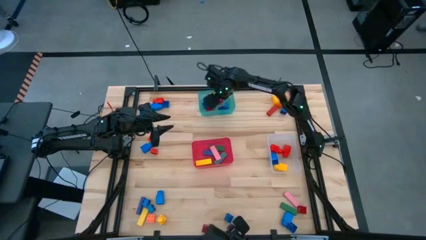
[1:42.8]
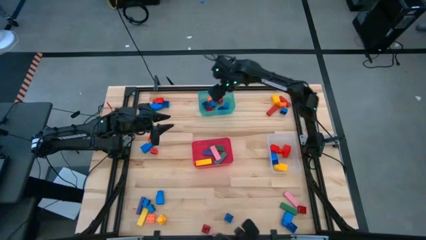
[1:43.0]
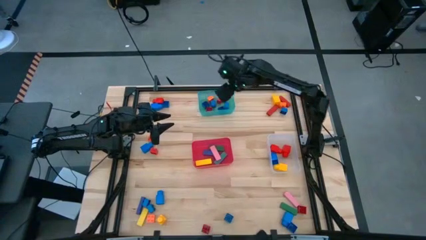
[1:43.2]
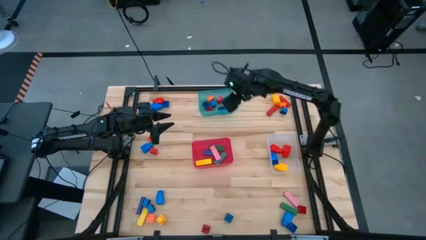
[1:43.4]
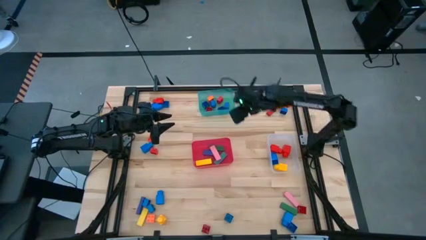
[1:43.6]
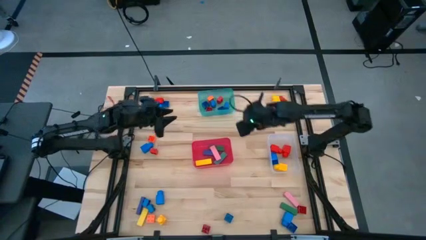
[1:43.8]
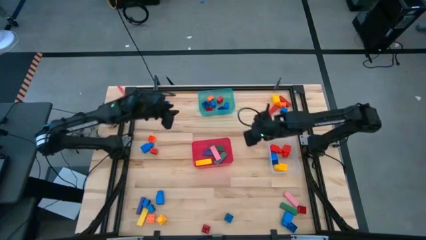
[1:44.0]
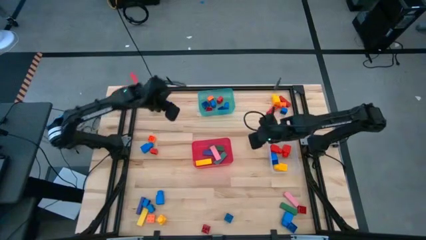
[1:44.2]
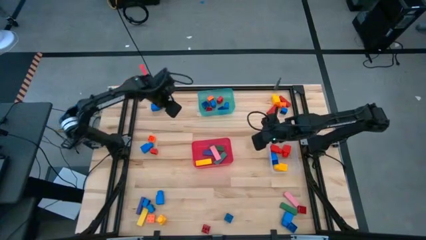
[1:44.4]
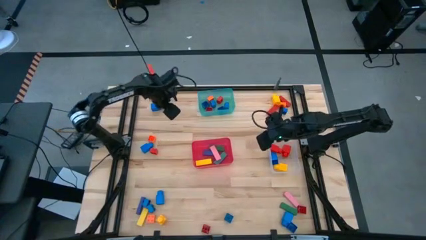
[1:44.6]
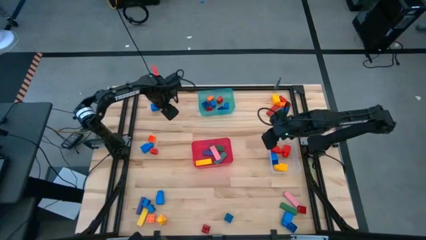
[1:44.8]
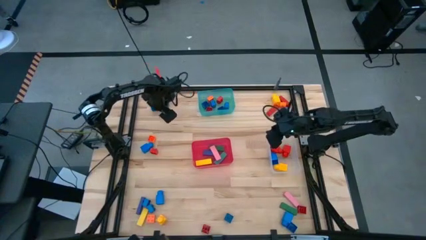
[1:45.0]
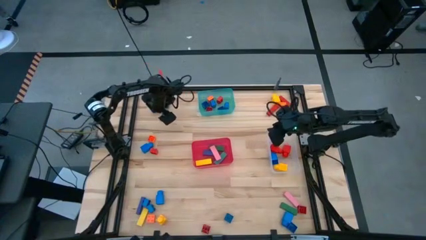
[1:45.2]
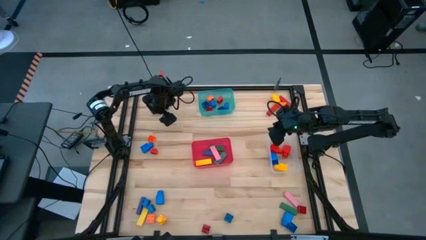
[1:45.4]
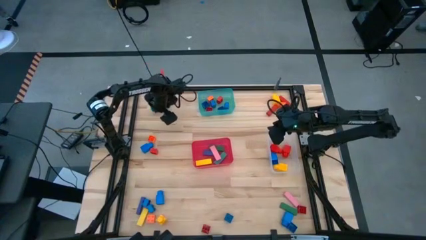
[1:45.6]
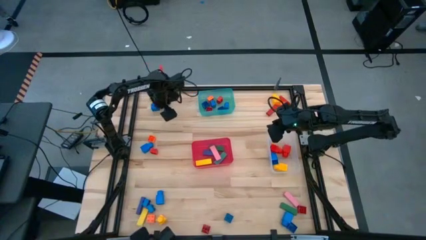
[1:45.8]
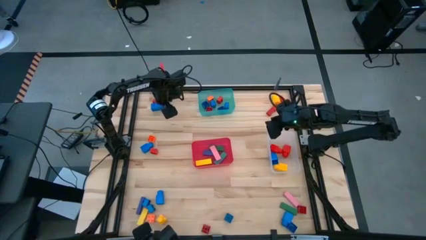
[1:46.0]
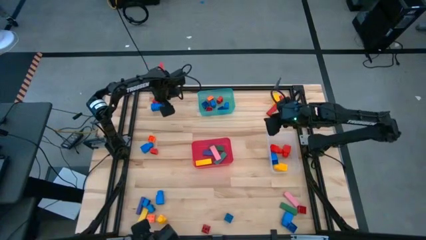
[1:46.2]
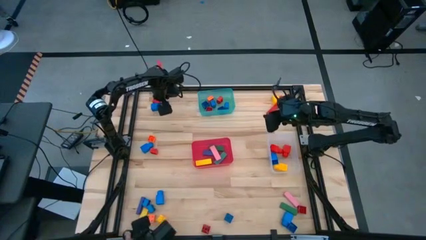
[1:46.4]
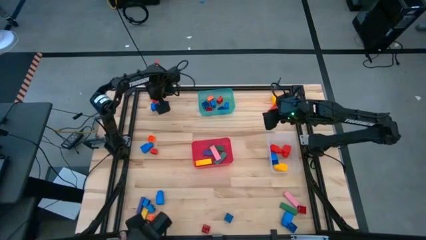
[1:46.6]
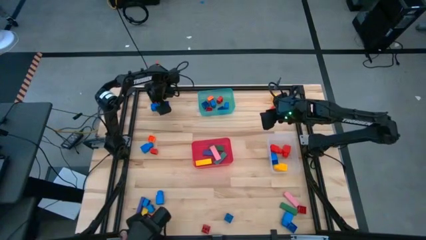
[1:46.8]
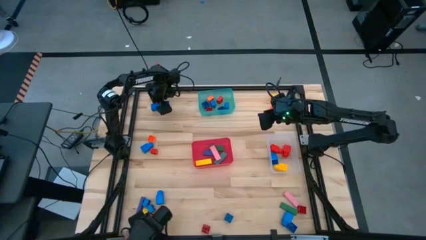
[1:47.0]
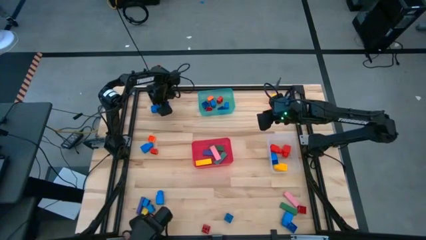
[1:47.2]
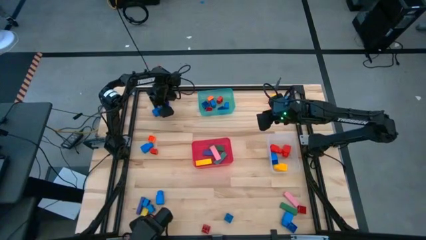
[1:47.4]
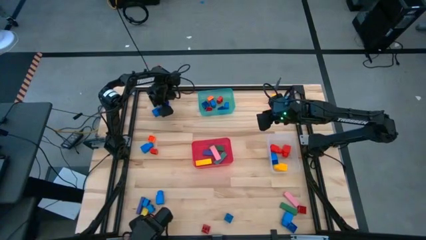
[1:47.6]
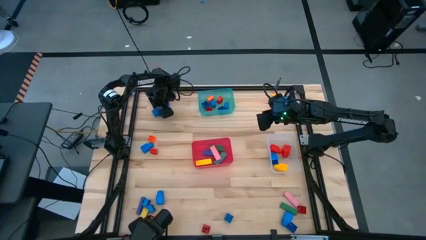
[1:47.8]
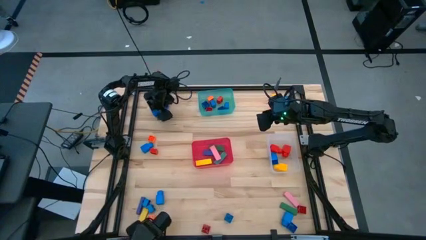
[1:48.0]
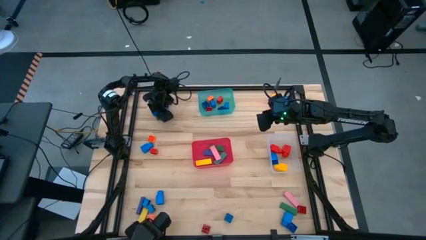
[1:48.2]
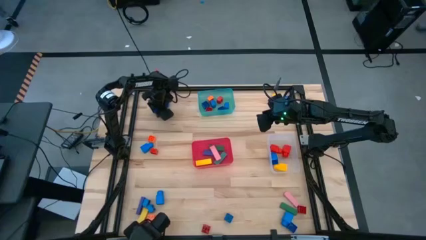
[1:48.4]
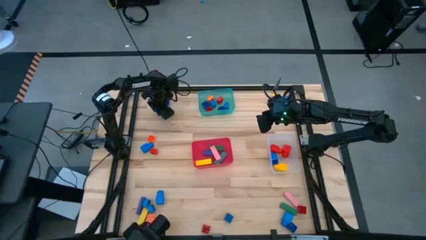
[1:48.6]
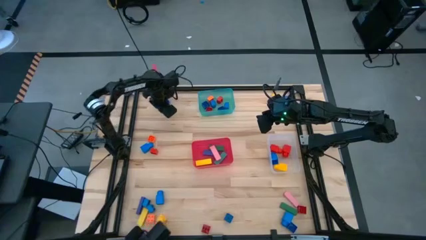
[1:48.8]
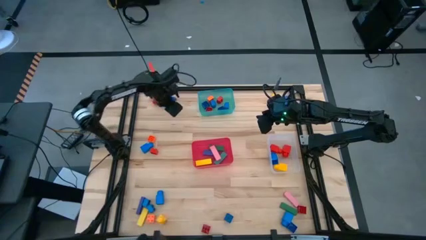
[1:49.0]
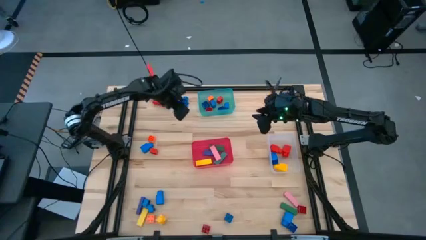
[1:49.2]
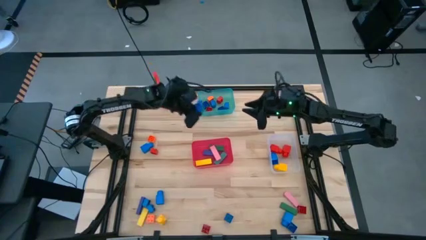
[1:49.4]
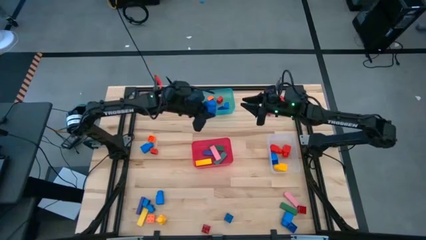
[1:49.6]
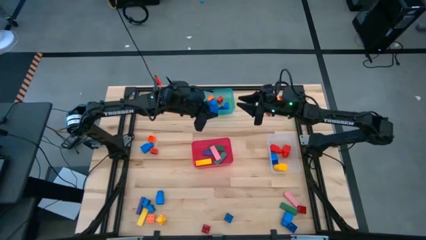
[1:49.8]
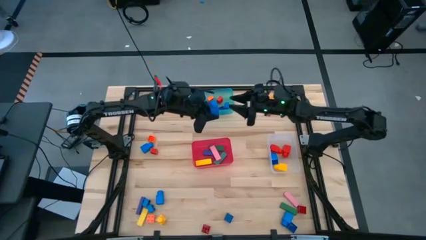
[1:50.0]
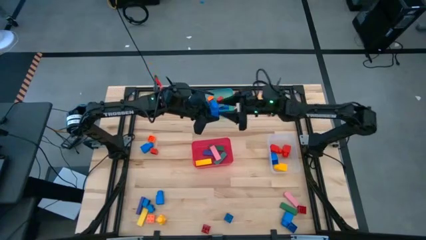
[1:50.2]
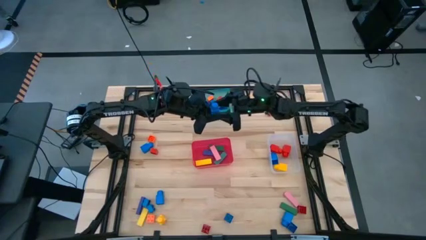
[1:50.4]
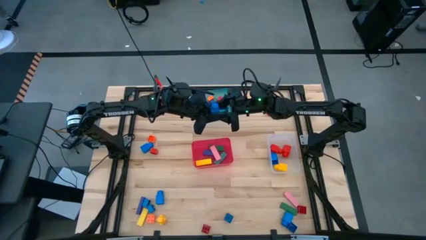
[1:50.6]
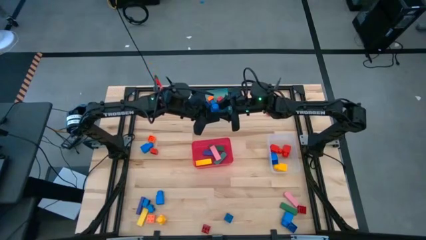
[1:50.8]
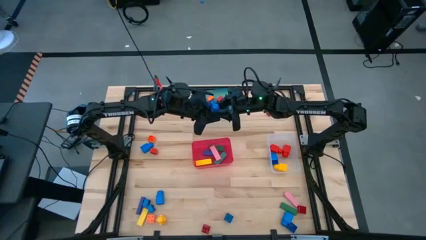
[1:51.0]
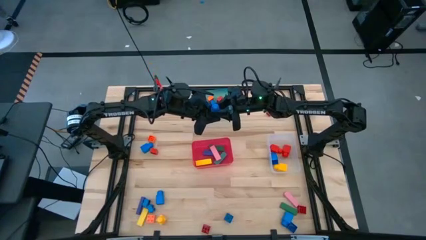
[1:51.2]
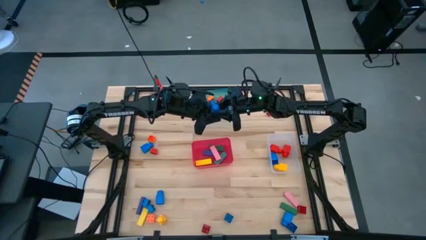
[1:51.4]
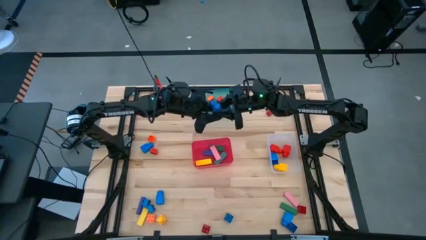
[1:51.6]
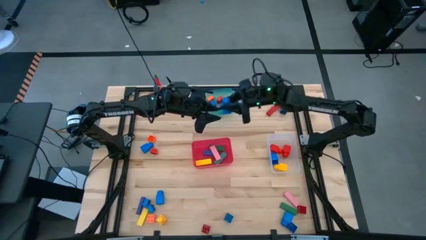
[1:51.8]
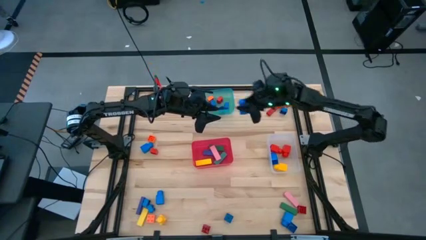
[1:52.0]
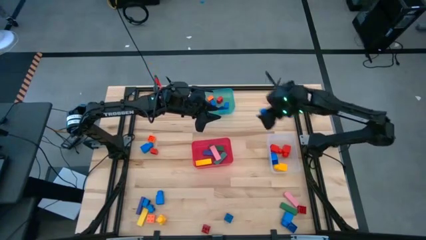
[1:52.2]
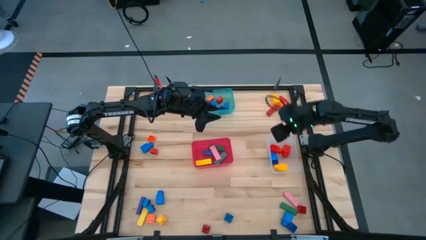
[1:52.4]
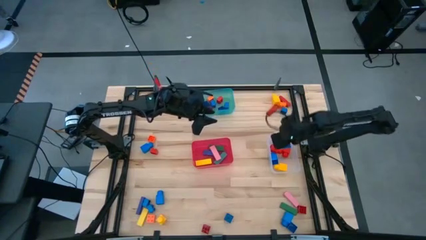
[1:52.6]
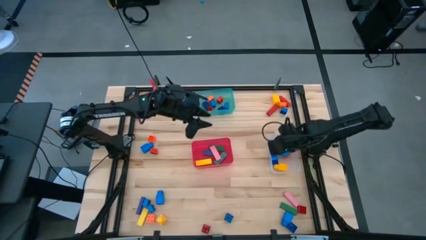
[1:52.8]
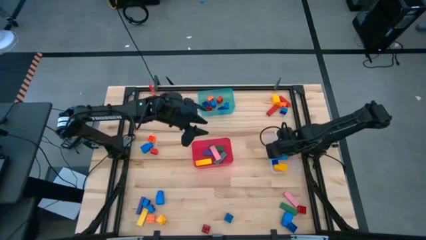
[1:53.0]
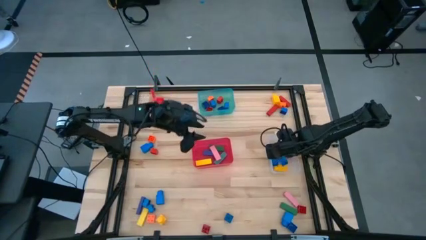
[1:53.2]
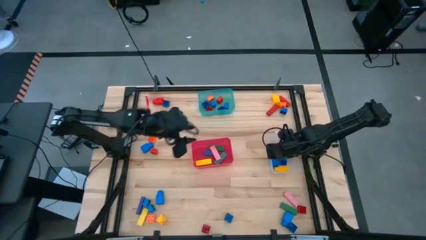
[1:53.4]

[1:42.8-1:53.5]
Task: Sort blocks by size
Put the blue 1 stud game piece into the transparent bin

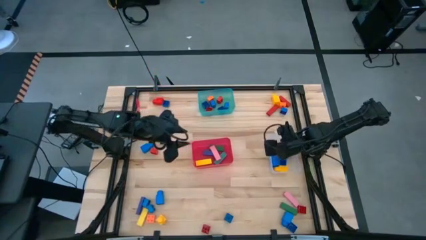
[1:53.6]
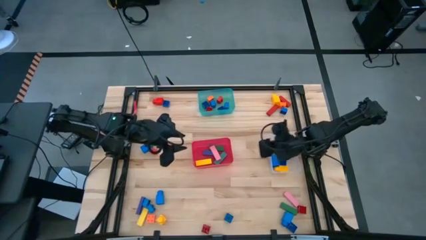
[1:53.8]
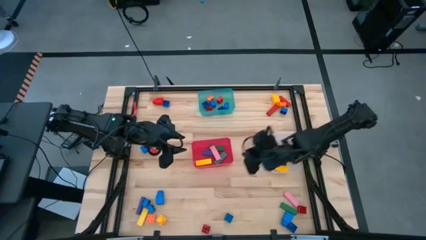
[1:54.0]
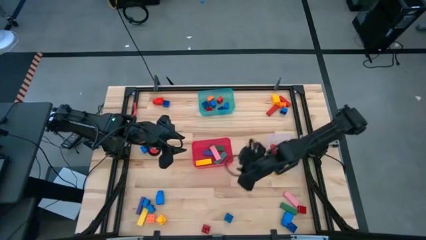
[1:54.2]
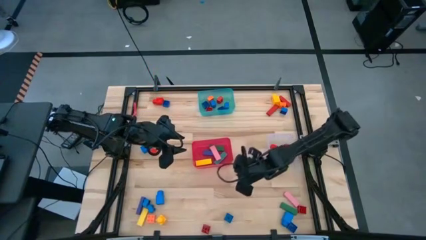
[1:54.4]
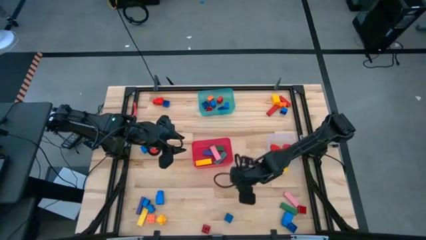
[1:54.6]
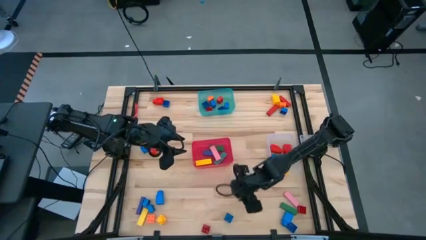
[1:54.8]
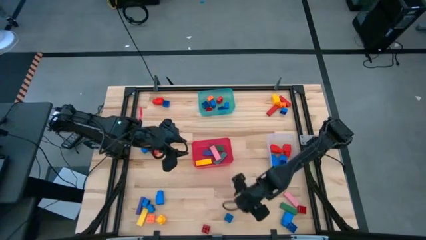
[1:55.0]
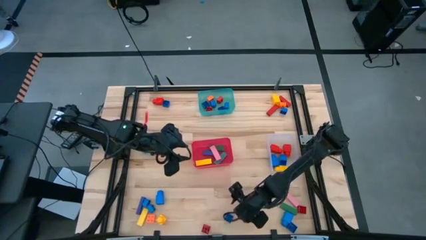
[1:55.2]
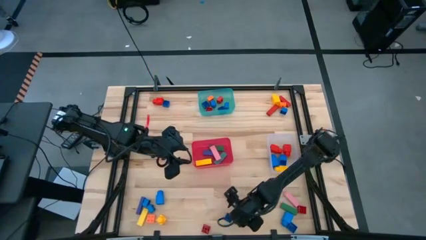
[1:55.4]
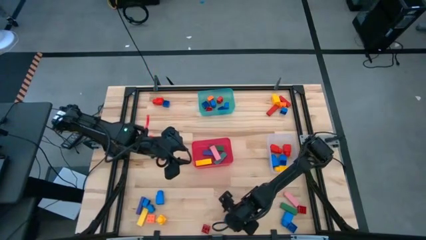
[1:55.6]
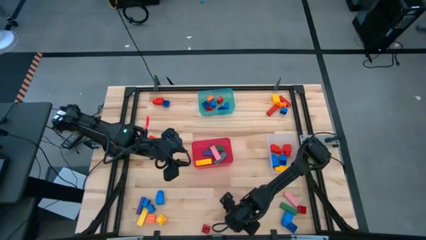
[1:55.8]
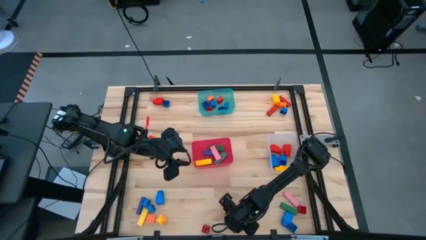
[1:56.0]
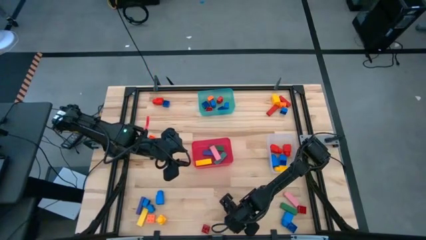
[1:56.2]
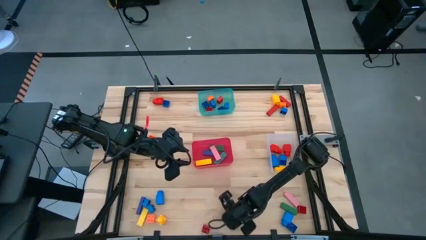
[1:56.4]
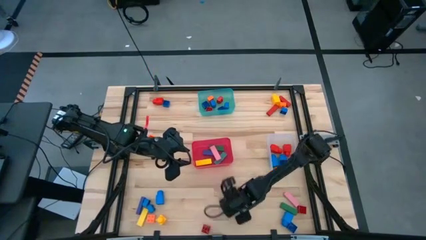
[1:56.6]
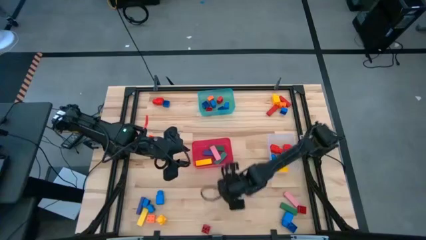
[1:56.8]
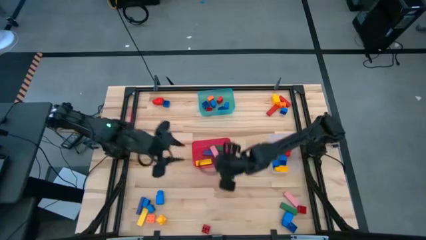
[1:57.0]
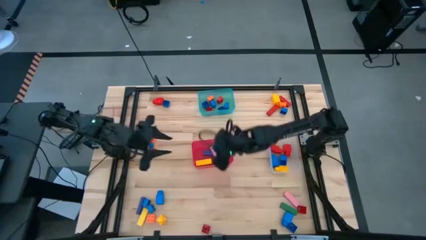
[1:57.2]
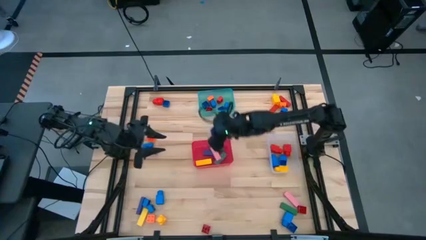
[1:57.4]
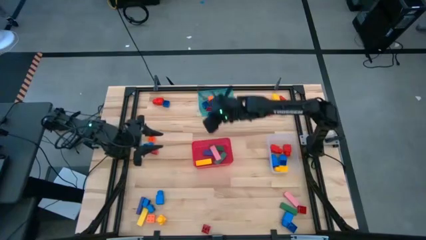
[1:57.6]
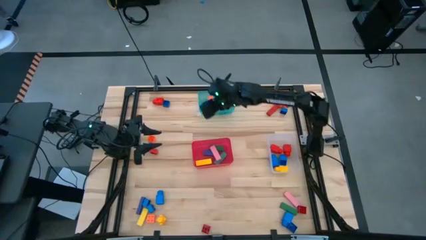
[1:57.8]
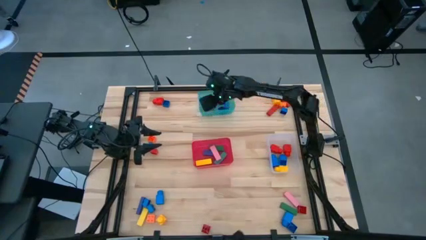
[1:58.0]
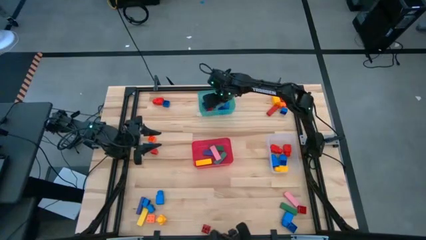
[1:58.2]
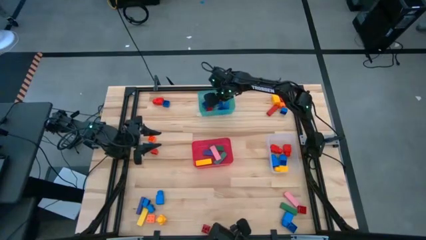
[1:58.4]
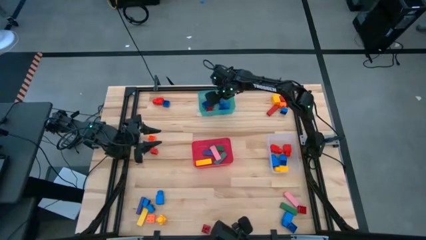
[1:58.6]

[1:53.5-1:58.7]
Put the blue 4 stud game piece into the blue bin
